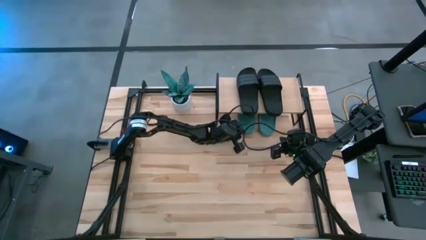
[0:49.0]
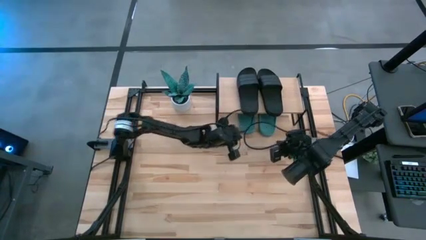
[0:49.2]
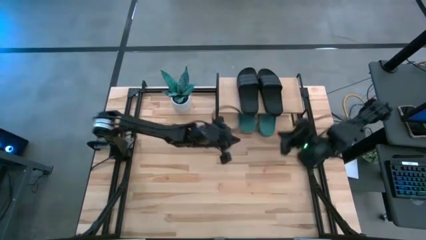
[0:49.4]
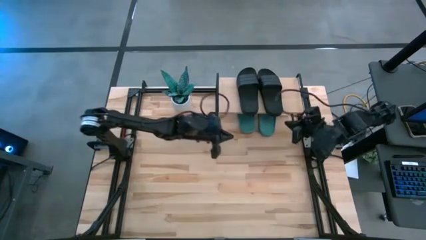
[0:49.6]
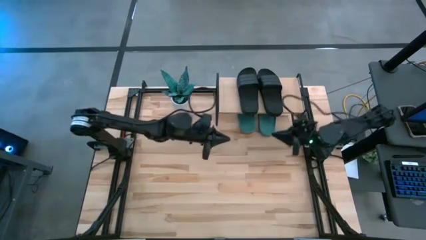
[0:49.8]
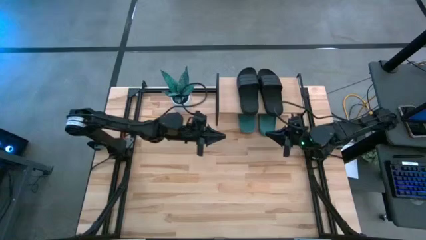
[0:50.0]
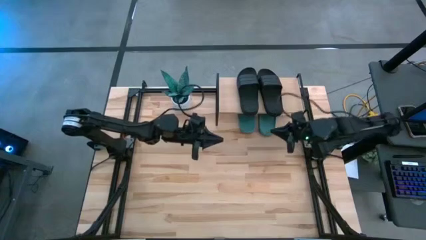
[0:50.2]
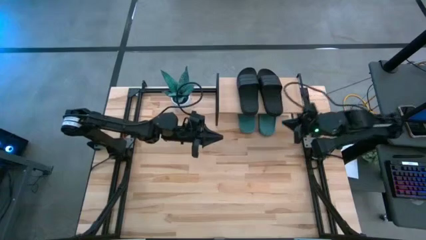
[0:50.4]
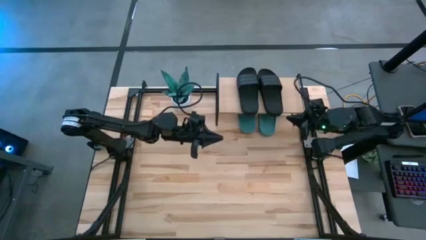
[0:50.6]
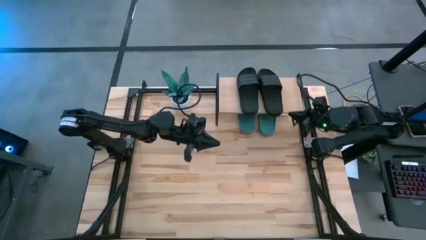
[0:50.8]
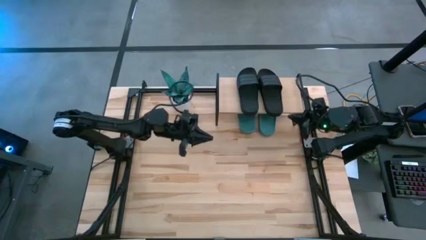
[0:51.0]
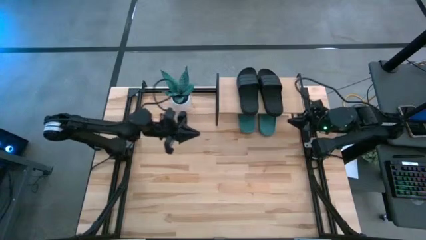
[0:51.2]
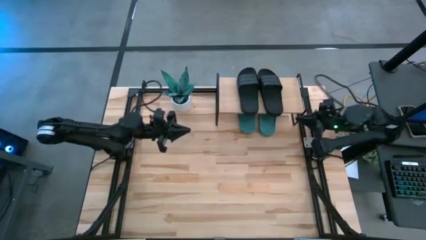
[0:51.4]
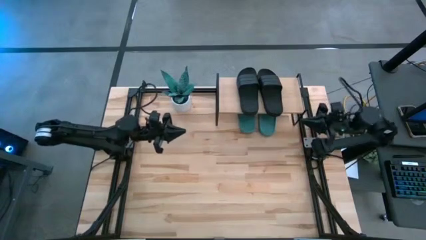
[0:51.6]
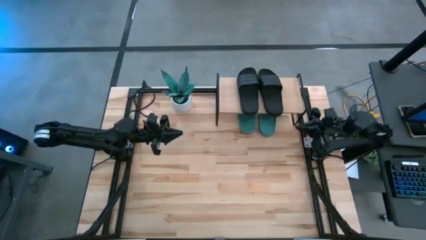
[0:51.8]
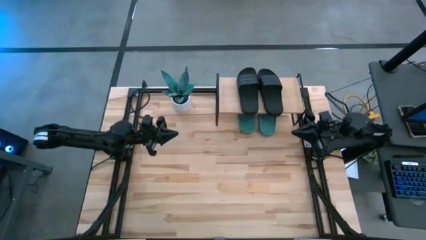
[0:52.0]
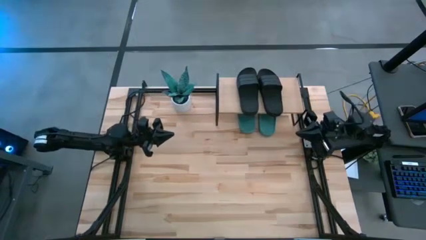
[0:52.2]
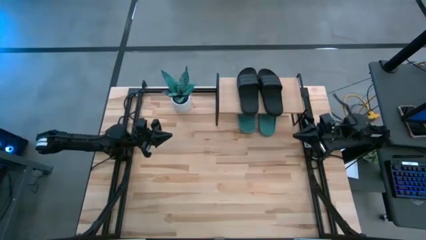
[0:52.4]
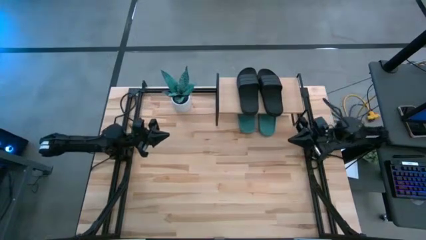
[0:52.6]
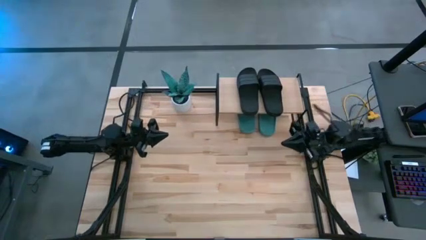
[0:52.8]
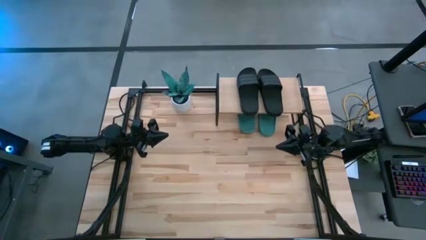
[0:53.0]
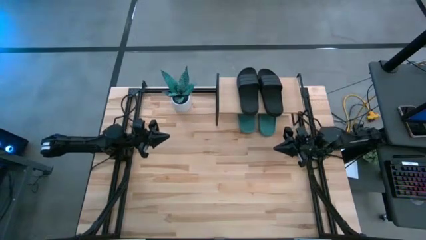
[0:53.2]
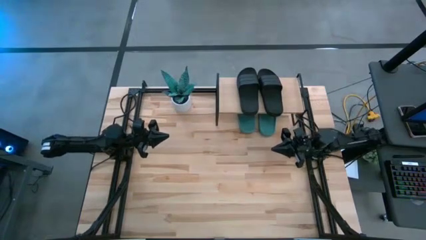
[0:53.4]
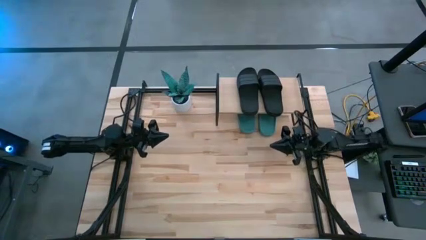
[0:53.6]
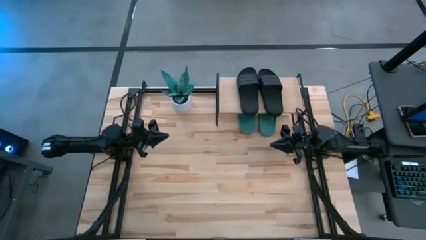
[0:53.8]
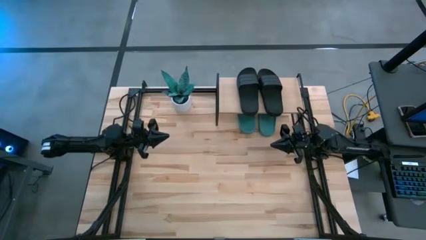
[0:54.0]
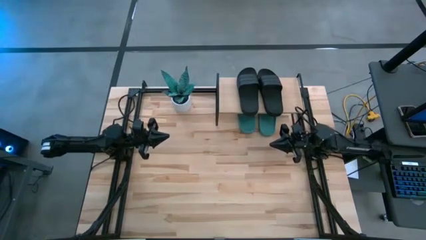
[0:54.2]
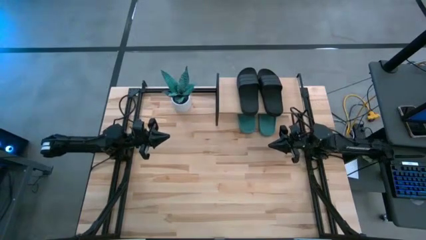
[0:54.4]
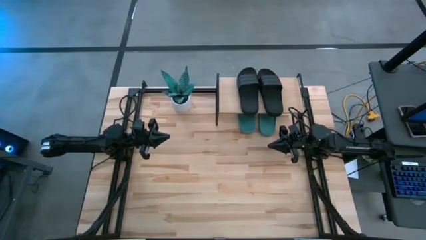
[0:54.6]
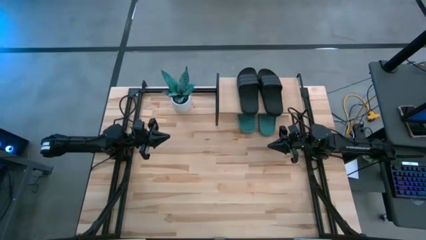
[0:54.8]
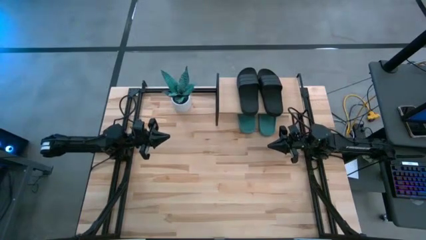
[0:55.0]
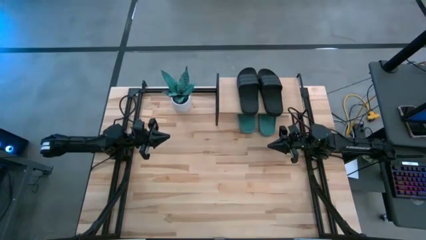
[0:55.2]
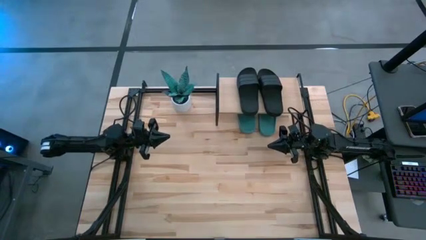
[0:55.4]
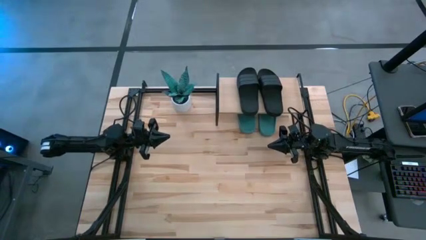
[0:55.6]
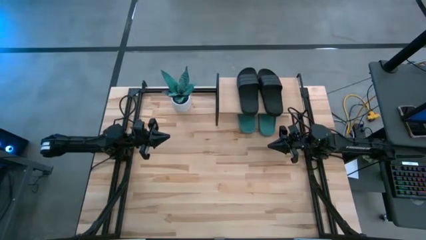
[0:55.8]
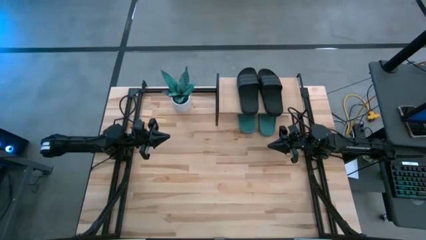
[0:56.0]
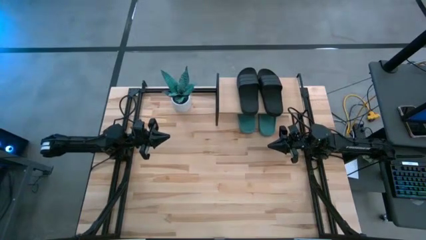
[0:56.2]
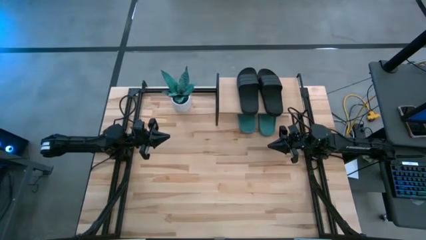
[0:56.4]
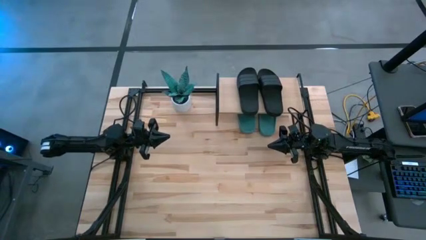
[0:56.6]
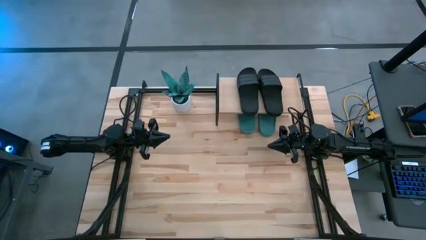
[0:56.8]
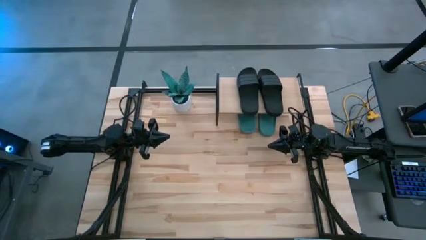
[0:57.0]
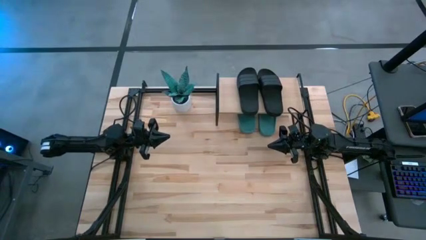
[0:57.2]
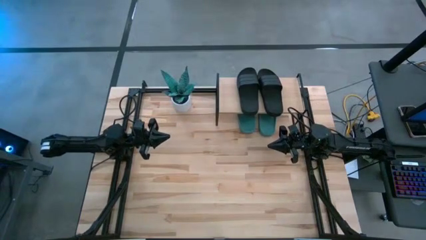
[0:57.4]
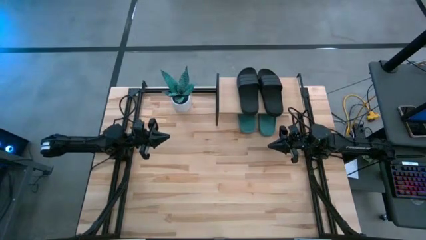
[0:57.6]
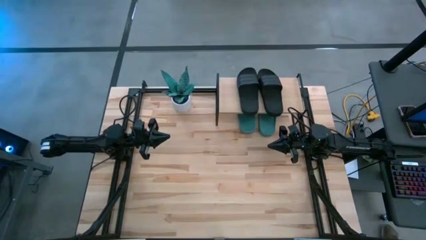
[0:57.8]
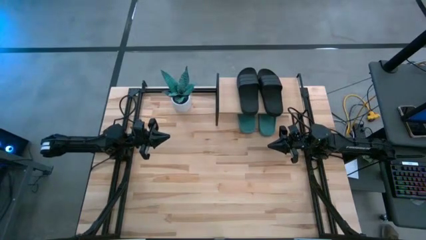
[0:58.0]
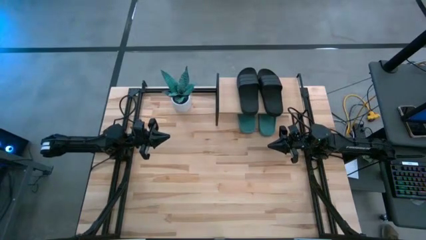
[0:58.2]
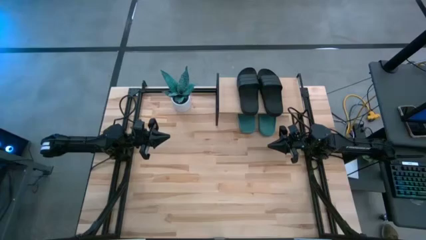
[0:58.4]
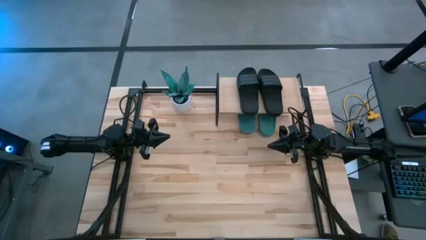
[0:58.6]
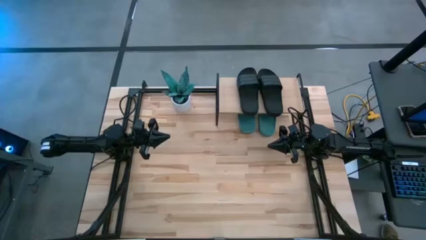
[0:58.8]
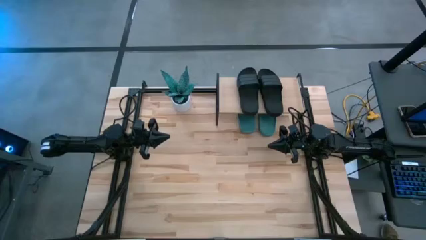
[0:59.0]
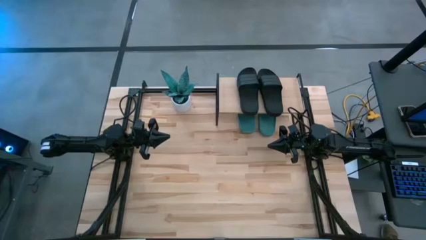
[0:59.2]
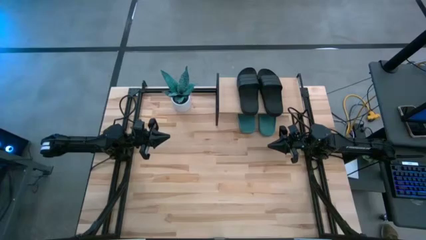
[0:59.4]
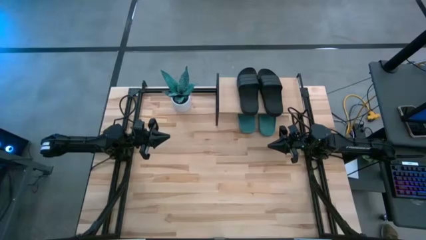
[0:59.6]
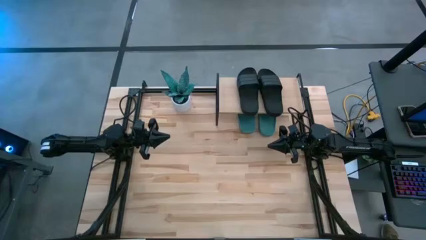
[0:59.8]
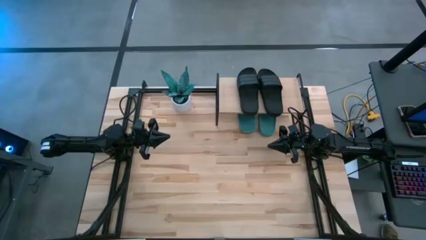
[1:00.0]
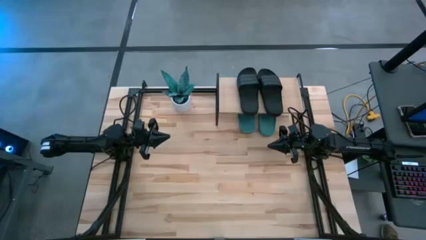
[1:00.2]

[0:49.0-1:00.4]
Task: Pick and place slides into the shelf
Return to Home Position
